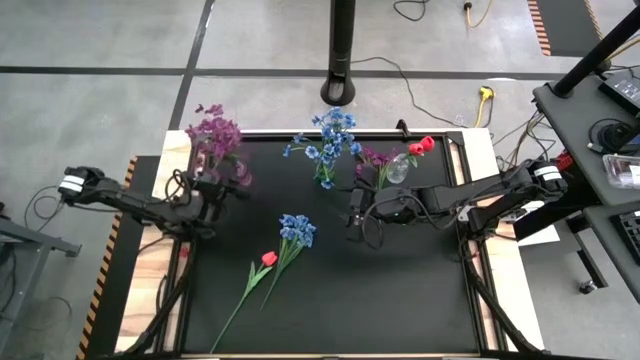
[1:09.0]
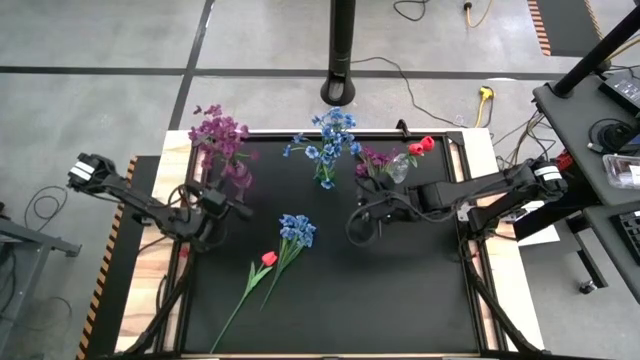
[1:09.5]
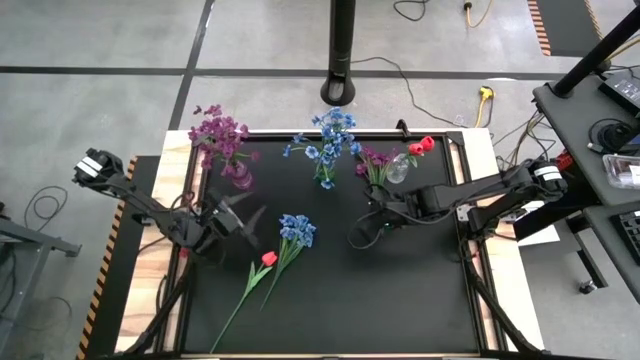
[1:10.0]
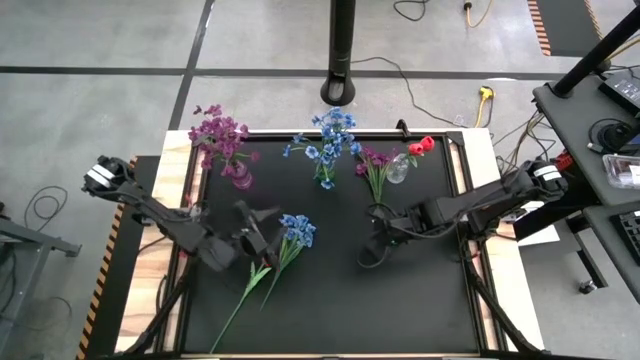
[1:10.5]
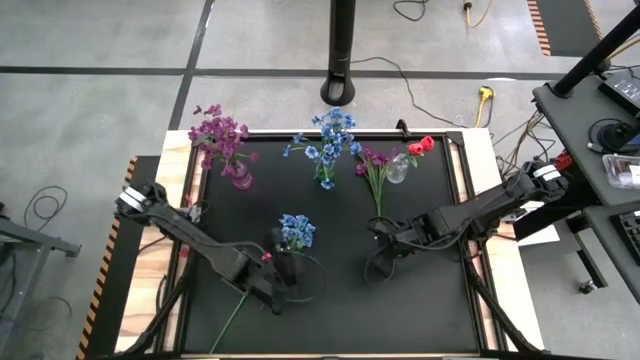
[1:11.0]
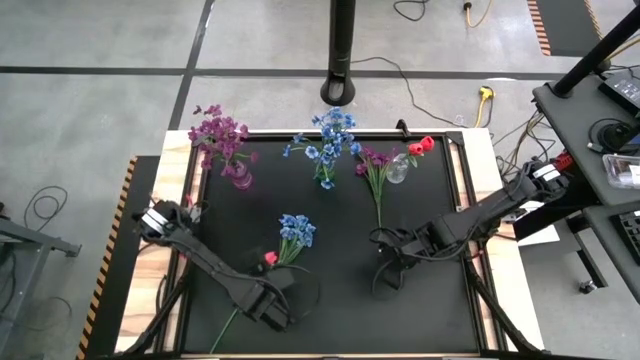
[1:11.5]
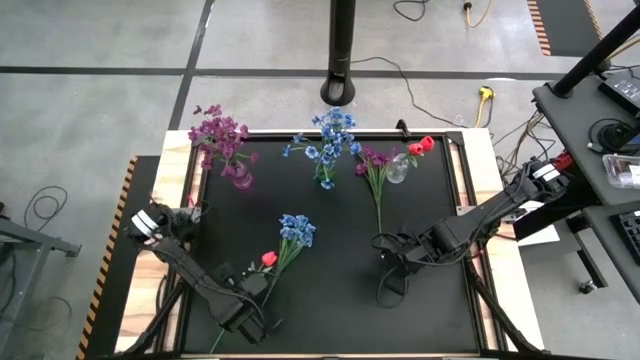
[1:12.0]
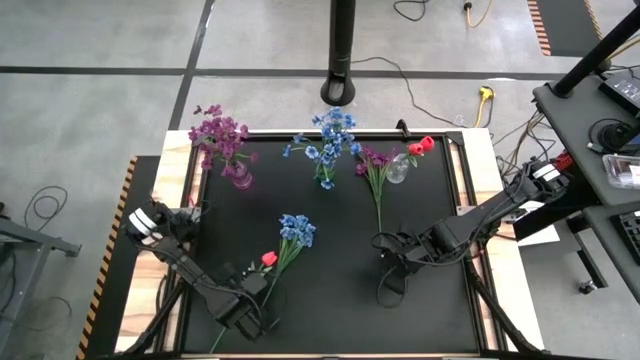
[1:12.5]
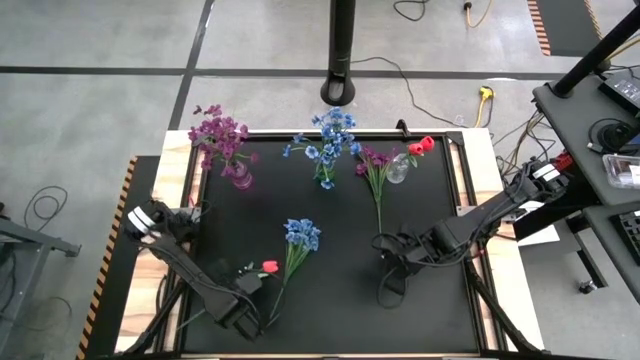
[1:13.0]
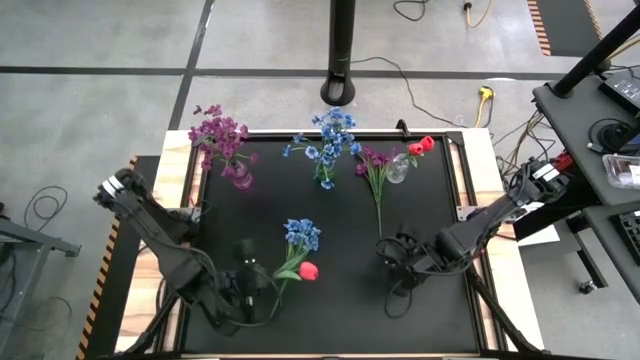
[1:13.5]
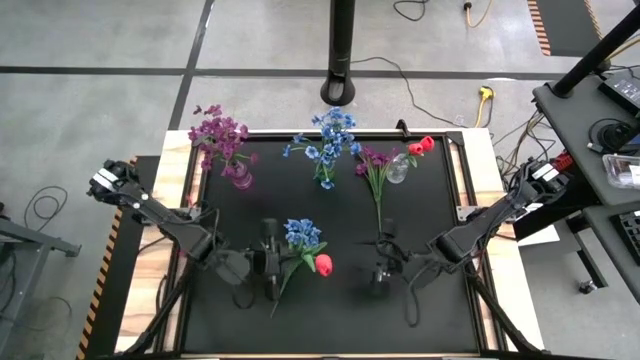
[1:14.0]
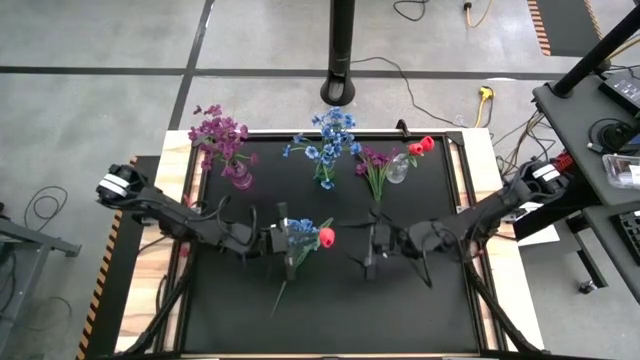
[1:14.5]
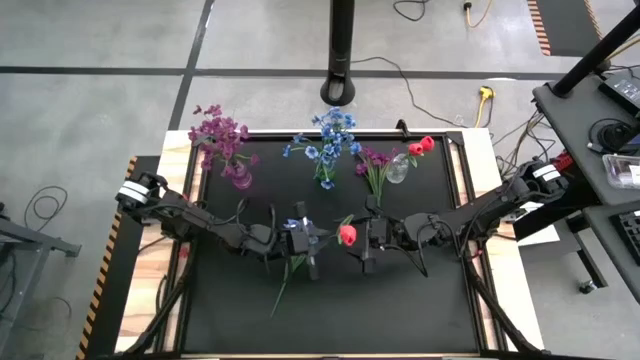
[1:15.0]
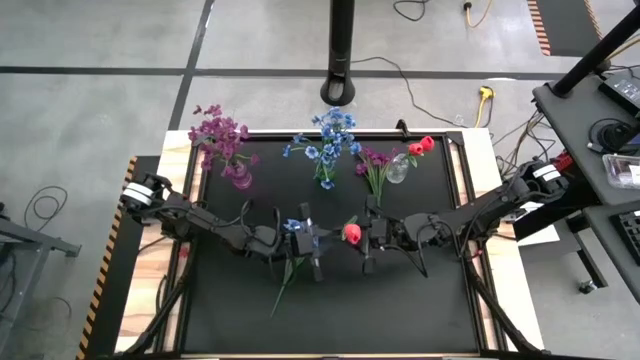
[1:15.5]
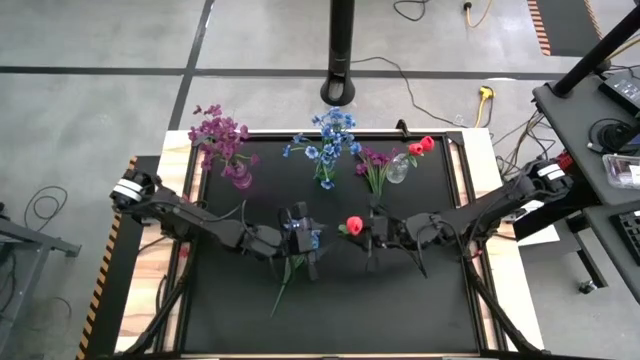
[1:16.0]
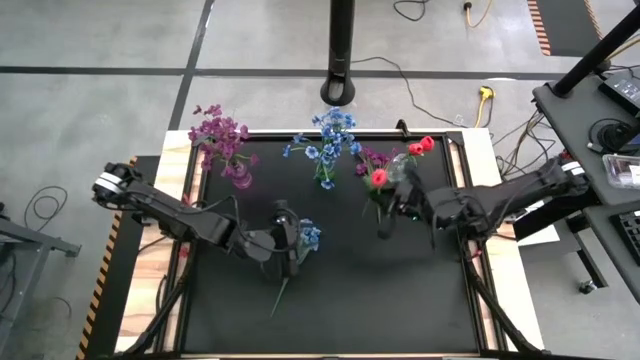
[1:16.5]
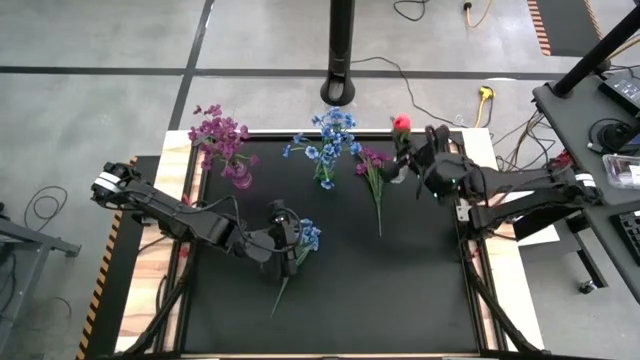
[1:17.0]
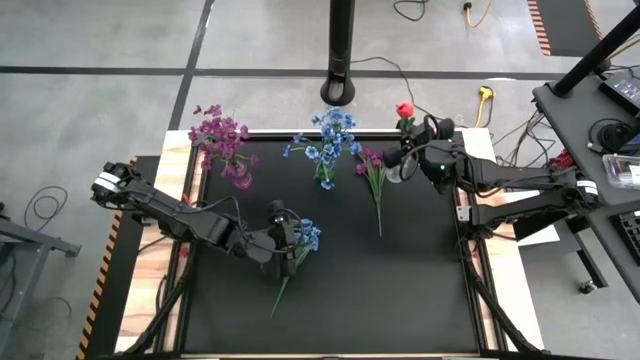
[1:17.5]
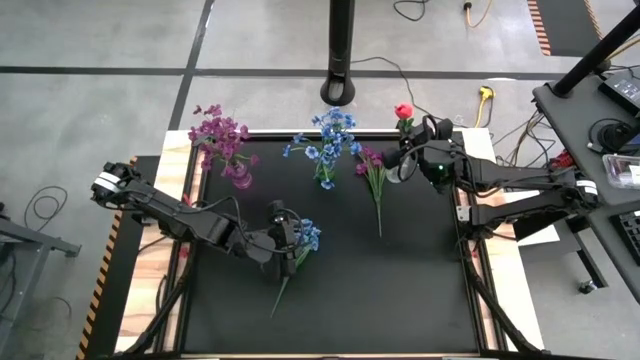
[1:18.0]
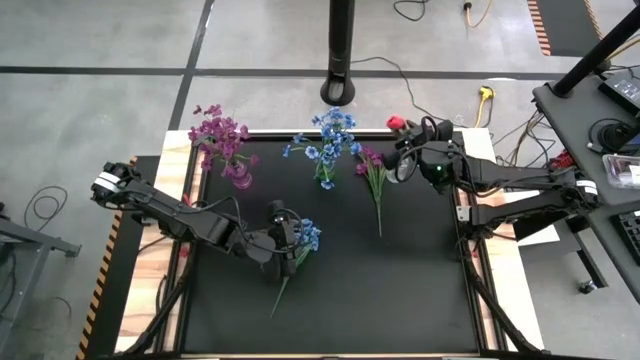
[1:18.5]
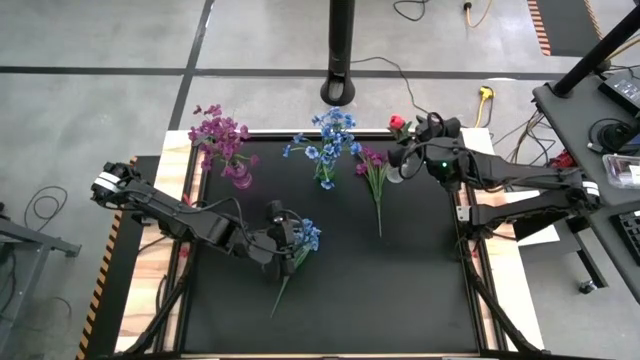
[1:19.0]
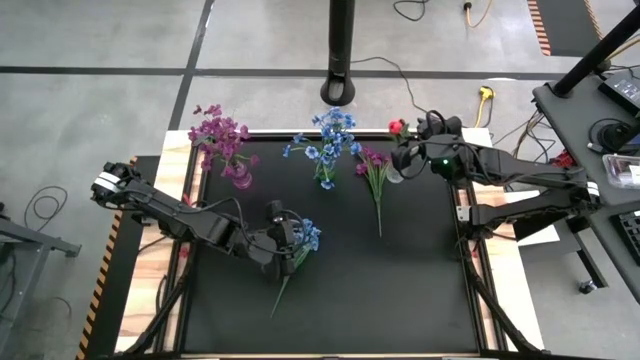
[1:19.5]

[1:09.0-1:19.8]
Task: Sort flowers into vase by color
Put the red tulip into the transparent vase

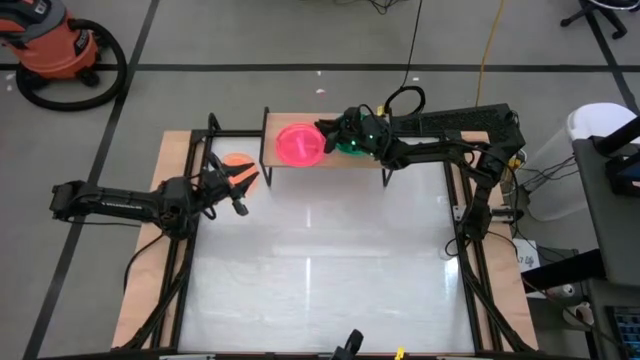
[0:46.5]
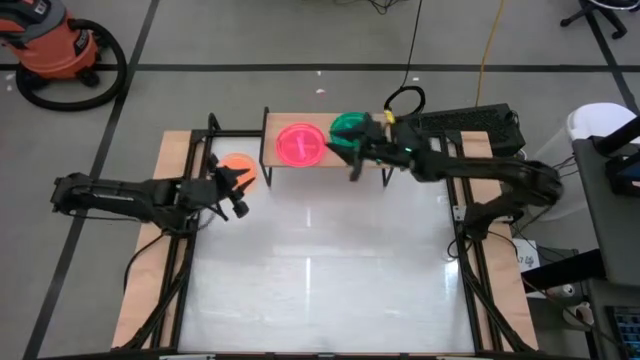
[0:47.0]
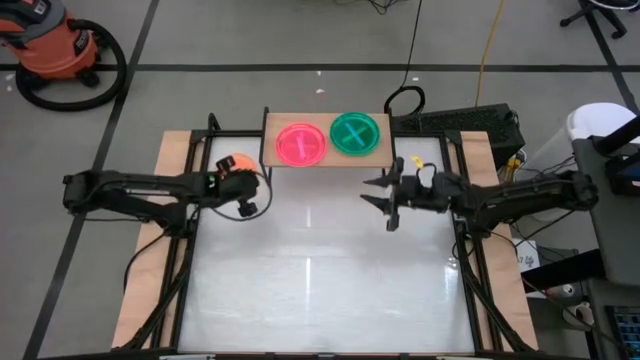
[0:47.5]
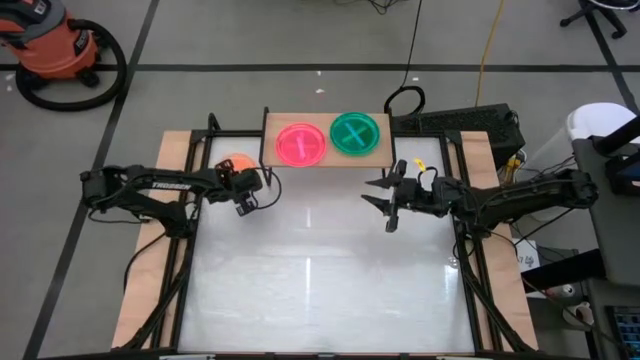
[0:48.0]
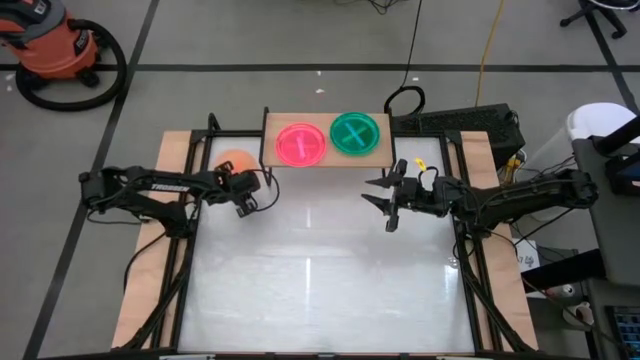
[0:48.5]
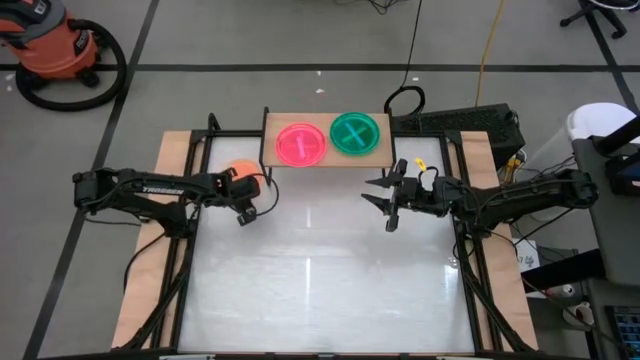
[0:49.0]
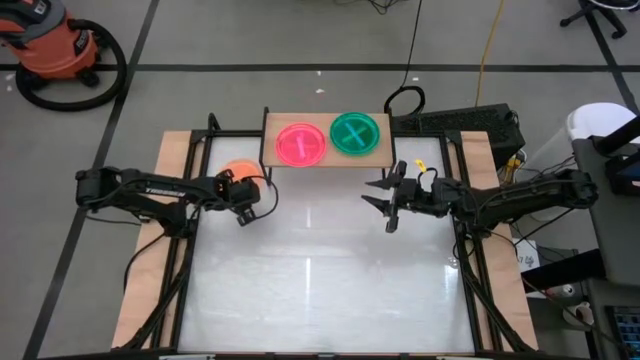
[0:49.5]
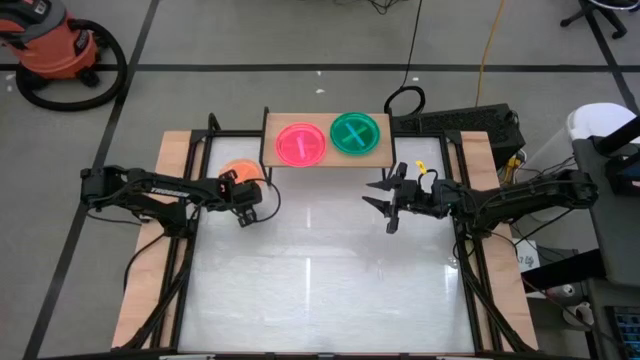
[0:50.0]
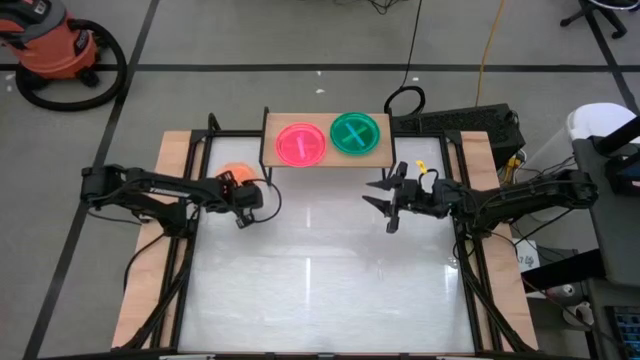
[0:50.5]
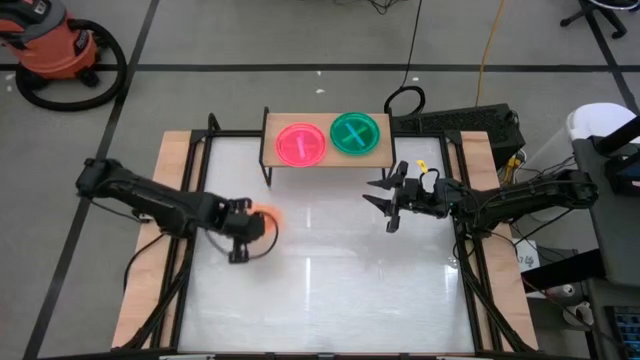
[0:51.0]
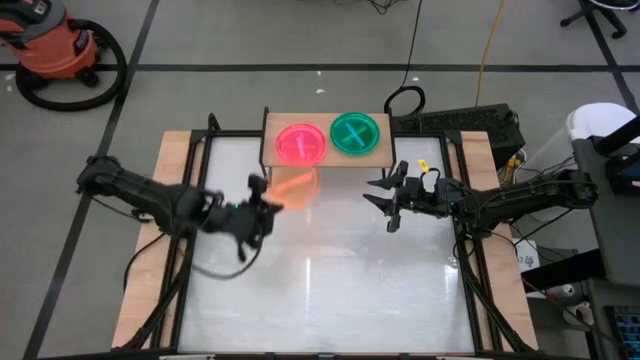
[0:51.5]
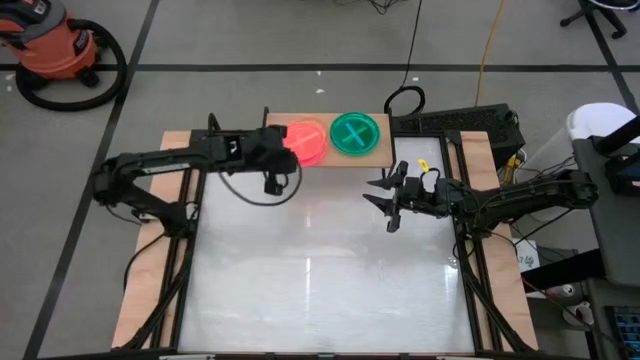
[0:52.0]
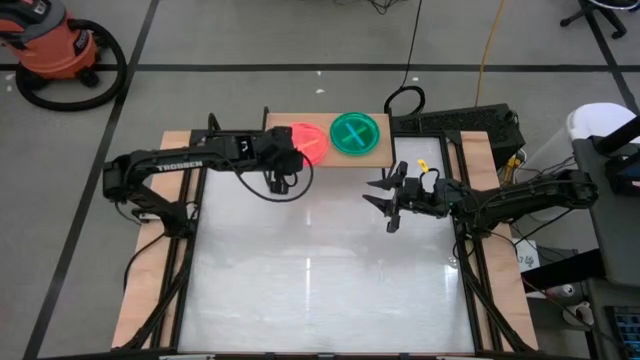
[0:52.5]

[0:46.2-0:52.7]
Task: Place and stack plates onto a shelf
Stack the orange transparent plate on the pink transparent plate on the shelf

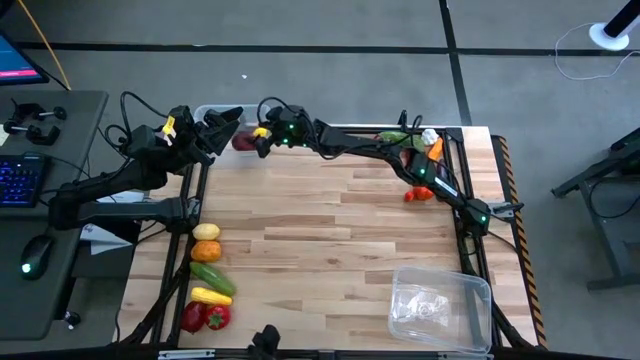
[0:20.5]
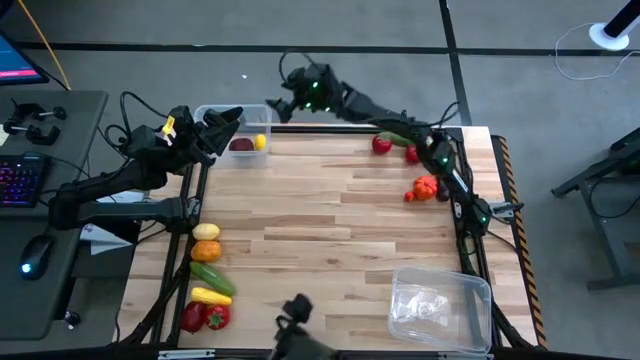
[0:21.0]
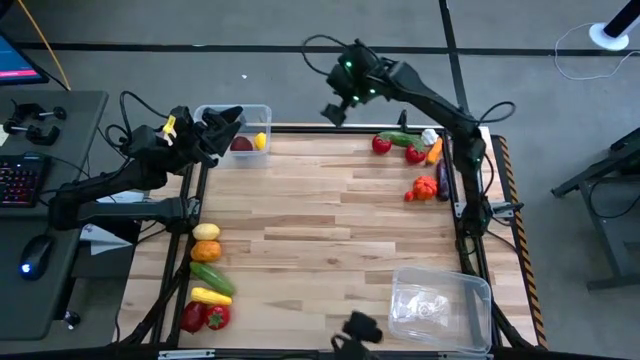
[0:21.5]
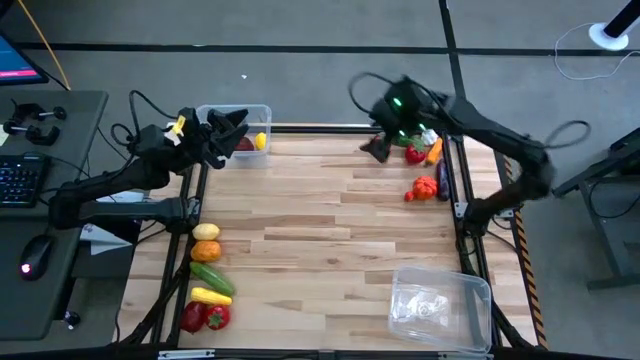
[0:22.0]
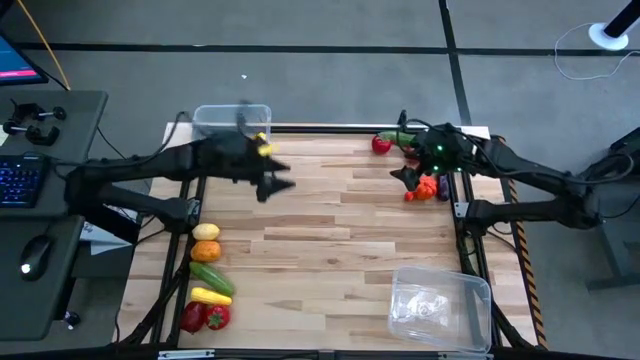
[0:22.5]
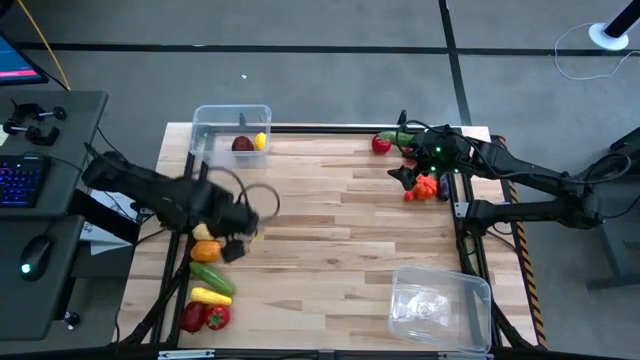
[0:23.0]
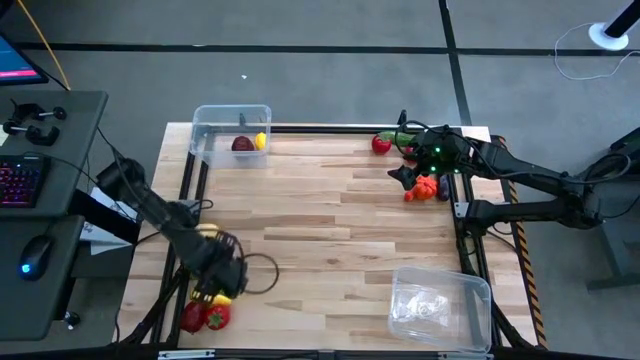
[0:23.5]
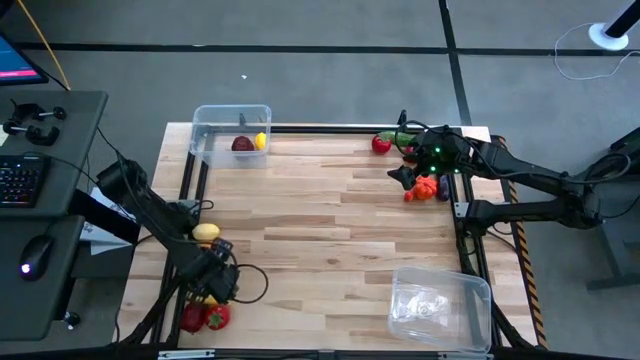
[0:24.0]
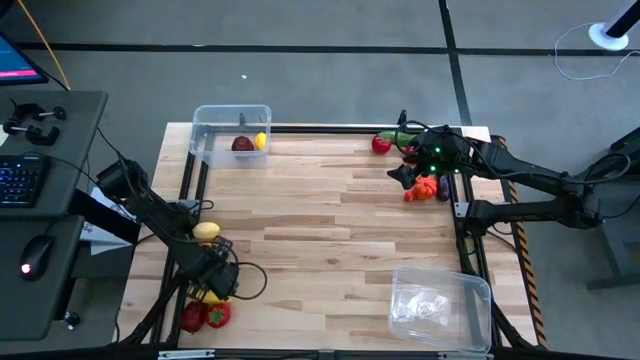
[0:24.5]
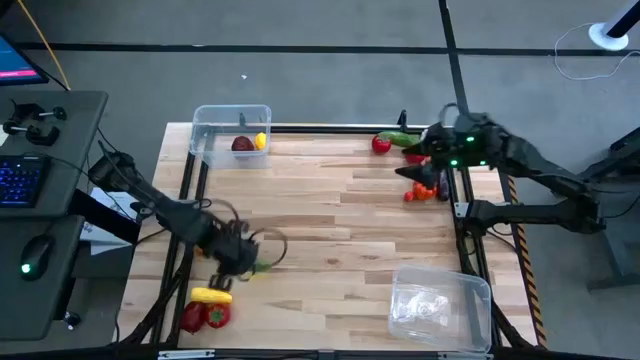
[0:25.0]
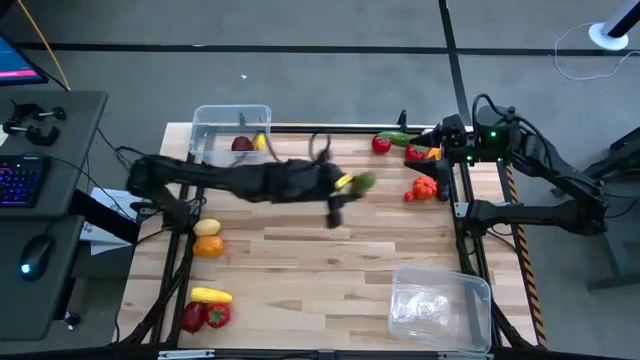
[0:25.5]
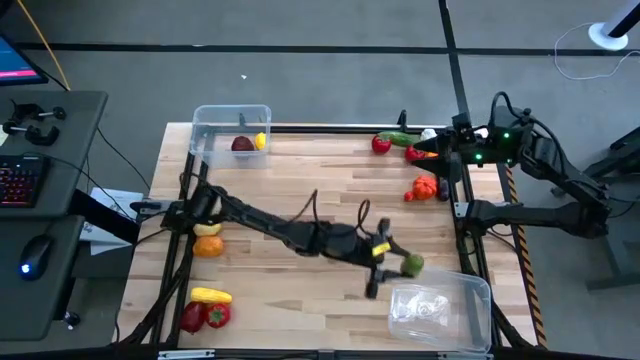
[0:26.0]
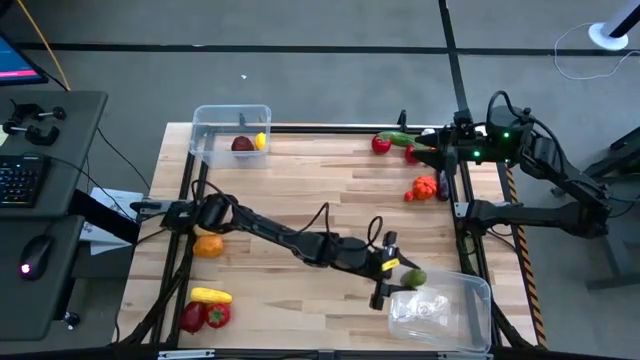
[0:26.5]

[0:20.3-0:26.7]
Task: Sort produce into baskets
Put the bottom green cucumber into the bottom transparent bin
